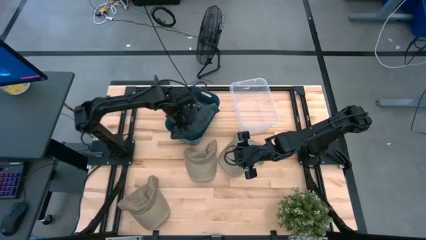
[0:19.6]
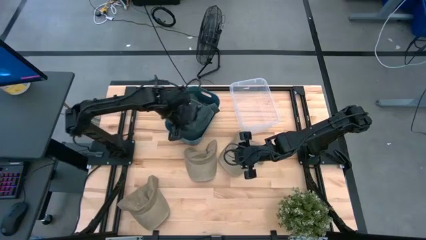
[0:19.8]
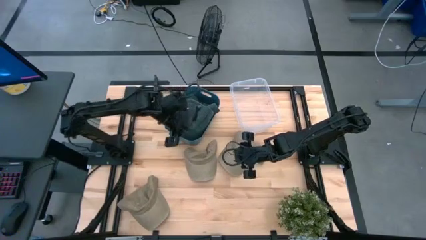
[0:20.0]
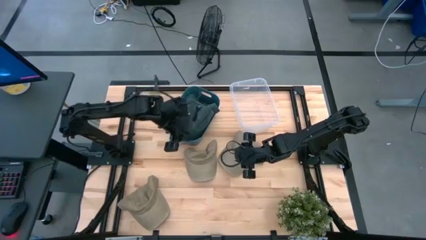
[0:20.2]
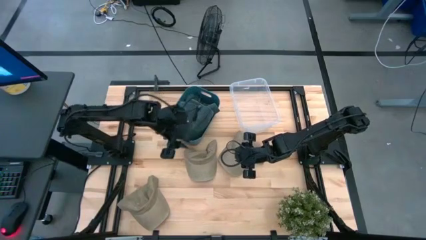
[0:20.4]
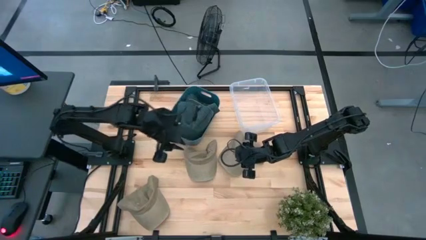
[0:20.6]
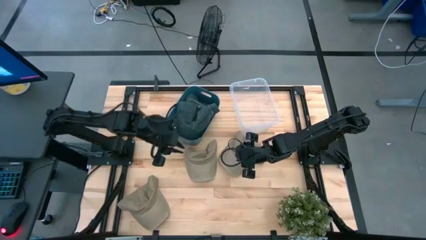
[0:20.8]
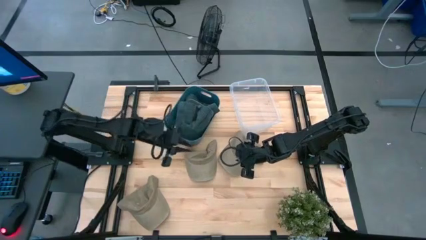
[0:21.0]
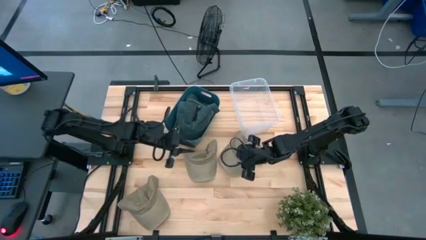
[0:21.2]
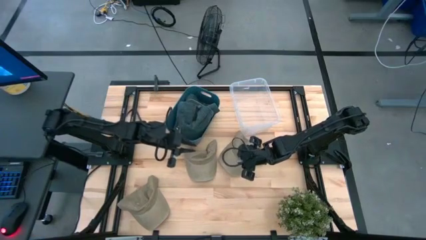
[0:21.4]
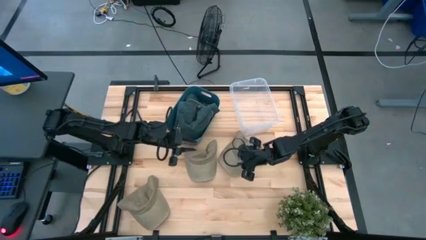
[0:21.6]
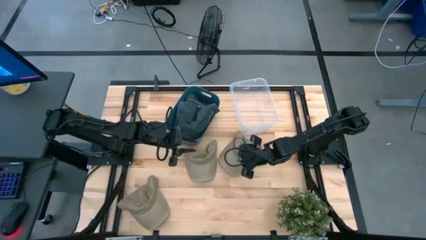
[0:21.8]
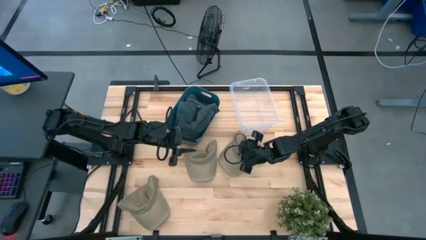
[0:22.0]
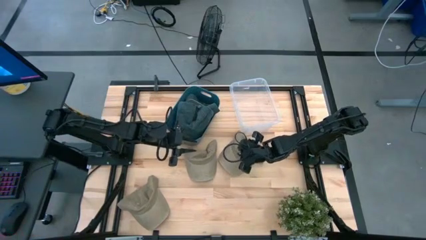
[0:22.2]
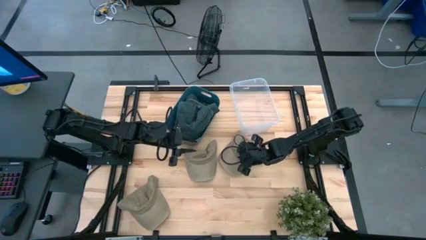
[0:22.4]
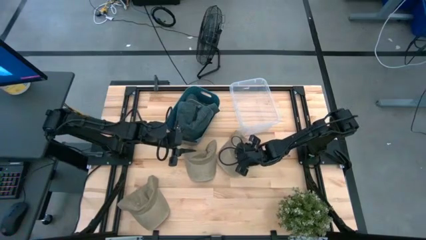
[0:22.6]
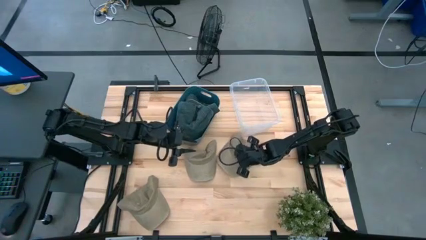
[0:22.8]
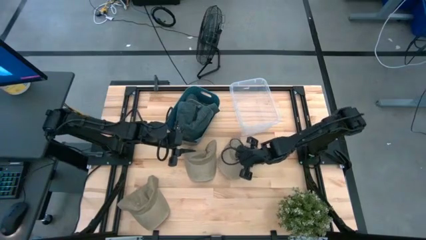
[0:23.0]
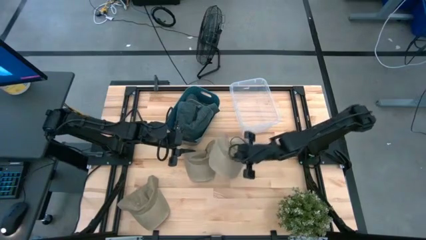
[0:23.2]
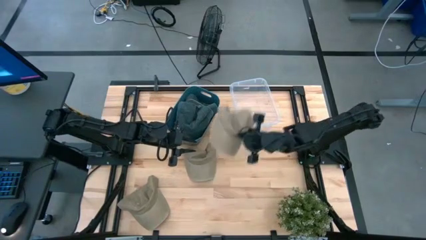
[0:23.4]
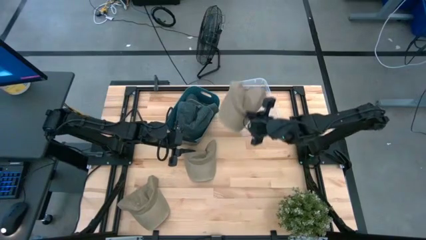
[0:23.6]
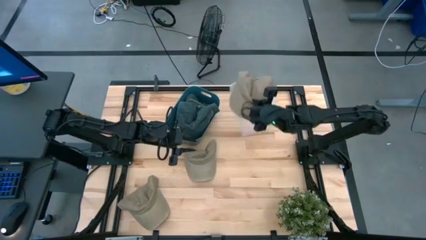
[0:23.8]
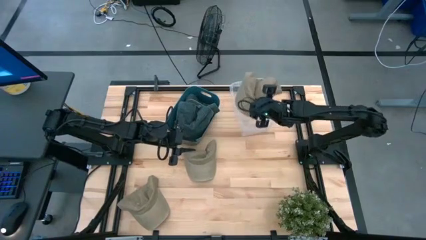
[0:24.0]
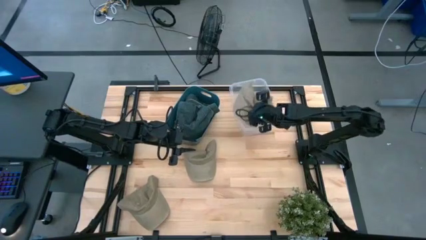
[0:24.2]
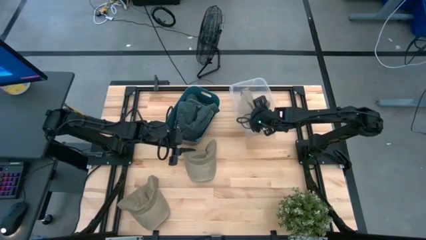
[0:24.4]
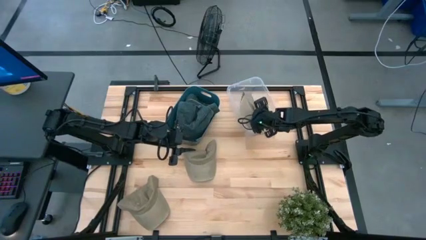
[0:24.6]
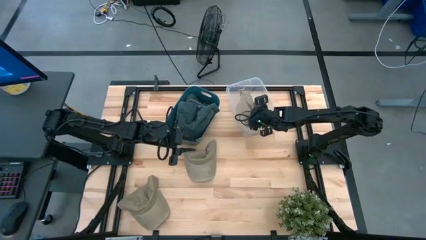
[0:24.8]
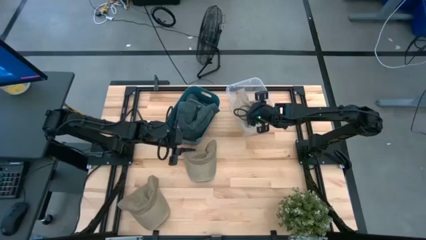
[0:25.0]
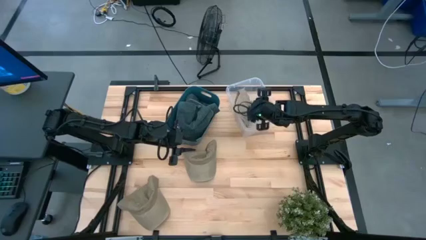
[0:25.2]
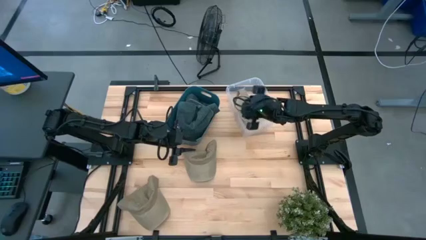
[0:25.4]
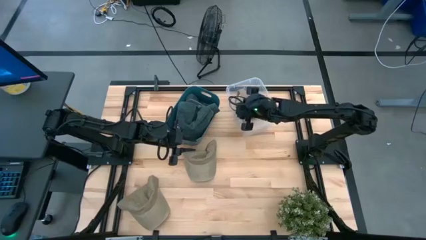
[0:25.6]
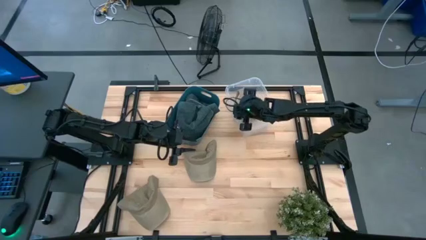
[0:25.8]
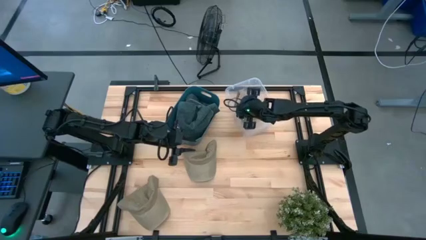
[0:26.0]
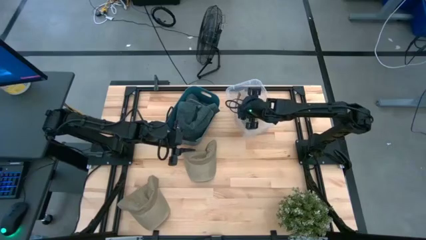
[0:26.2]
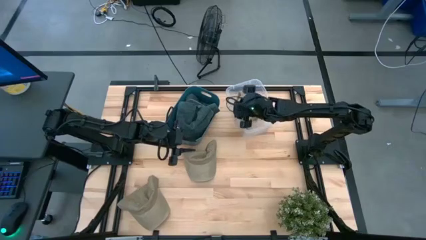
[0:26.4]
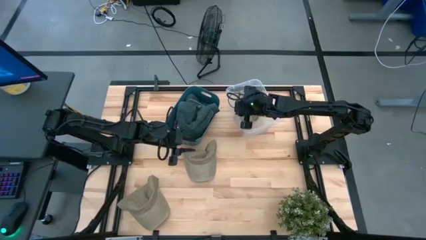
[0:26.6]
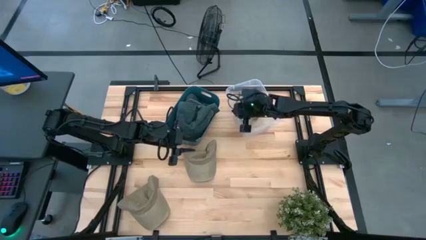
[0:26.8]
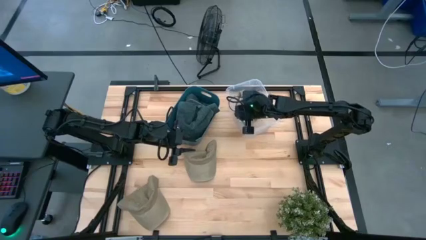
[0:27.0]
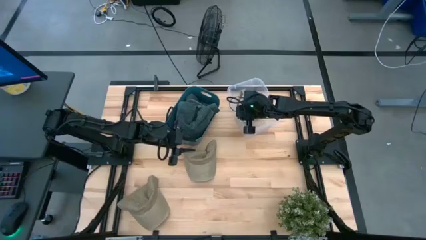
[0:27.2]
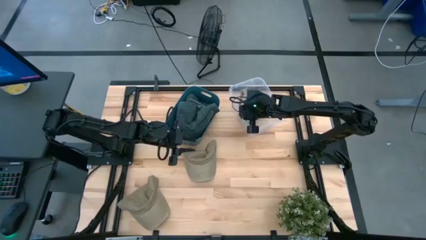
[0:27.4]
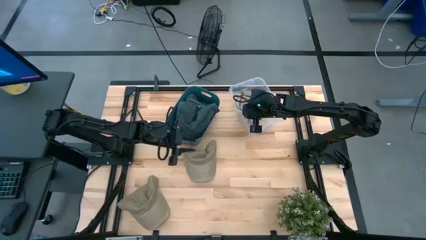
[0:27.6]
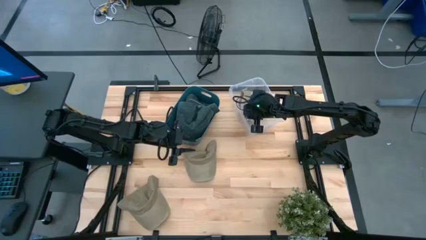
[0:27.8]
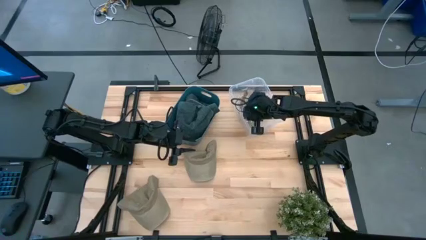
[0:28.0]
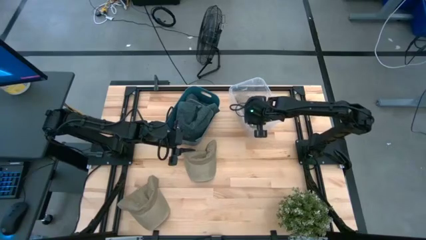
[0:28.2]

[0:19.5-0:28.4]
Task: Pick & Place hat
Put the right brown cap into the transparent bin

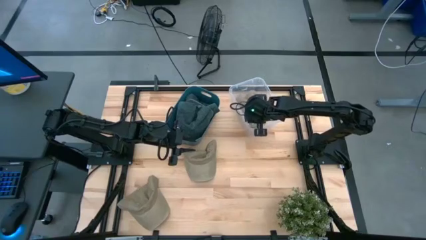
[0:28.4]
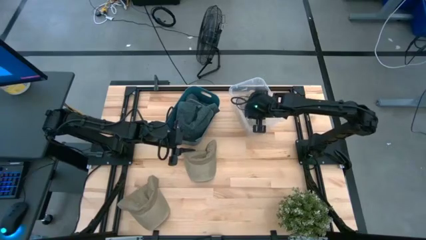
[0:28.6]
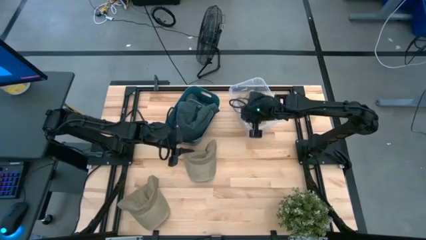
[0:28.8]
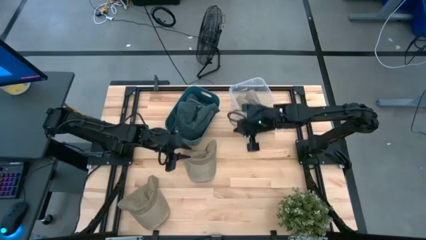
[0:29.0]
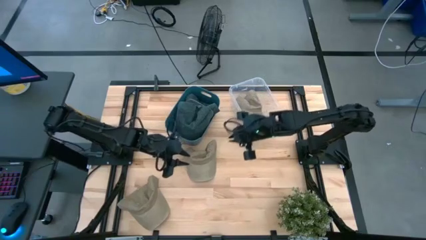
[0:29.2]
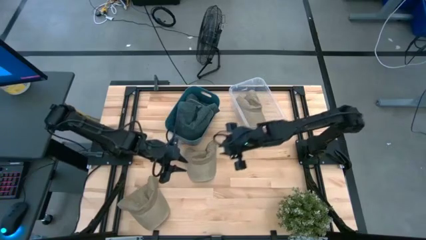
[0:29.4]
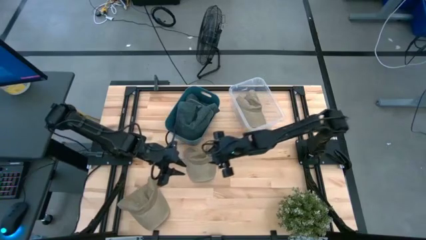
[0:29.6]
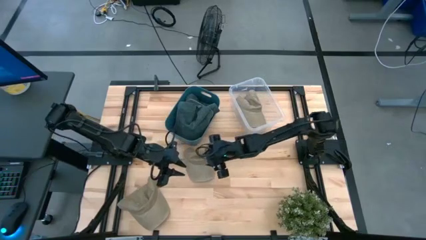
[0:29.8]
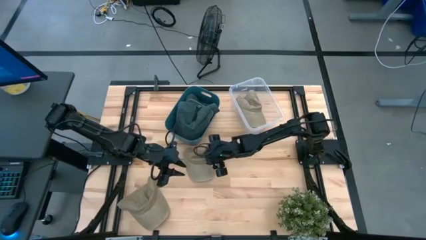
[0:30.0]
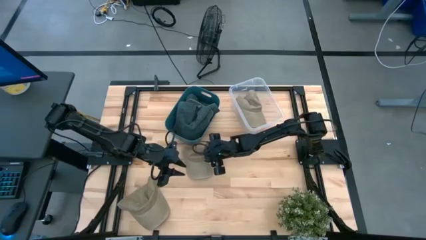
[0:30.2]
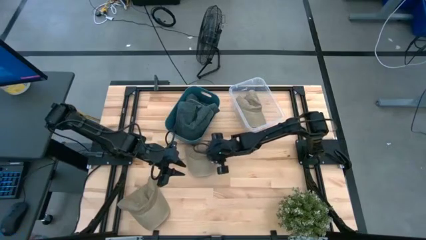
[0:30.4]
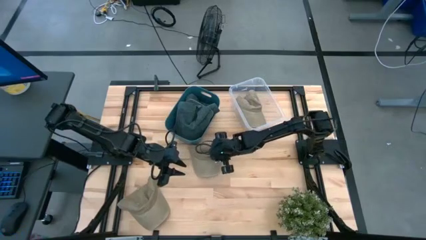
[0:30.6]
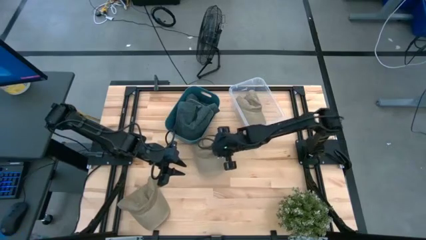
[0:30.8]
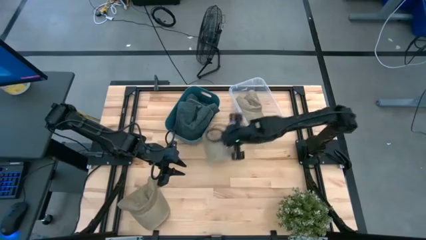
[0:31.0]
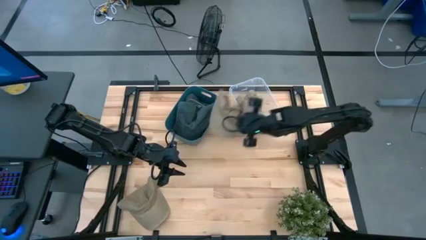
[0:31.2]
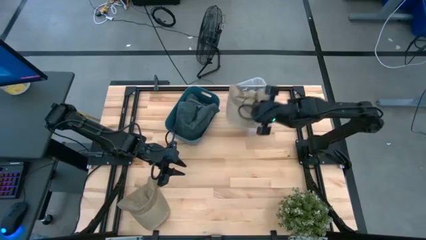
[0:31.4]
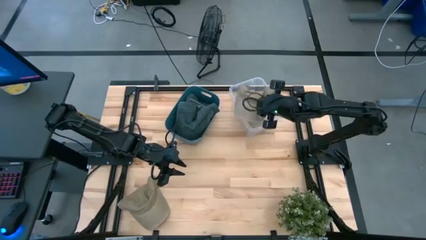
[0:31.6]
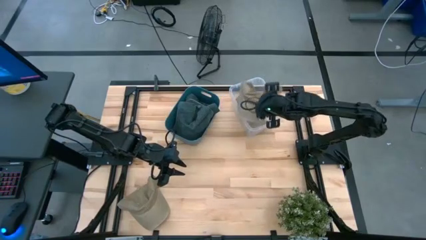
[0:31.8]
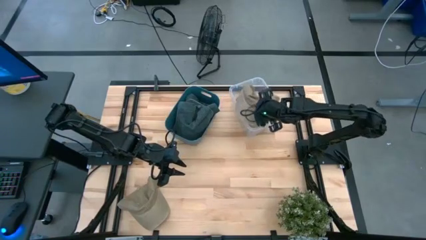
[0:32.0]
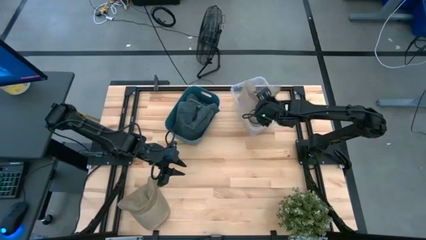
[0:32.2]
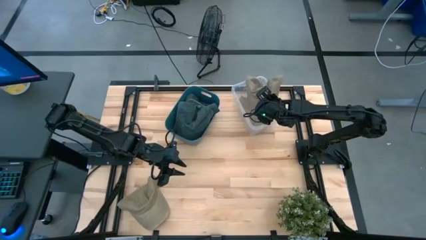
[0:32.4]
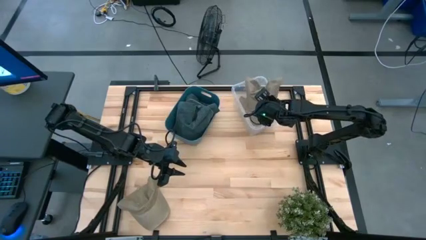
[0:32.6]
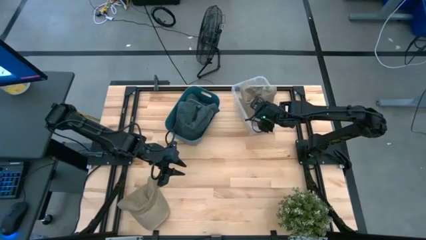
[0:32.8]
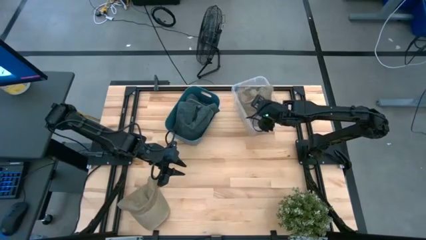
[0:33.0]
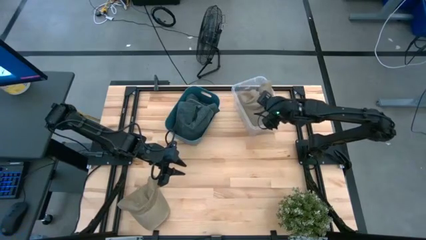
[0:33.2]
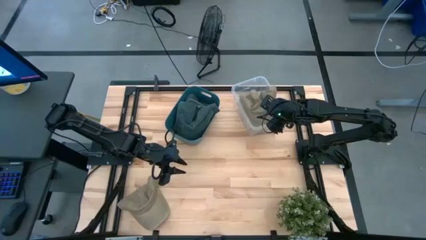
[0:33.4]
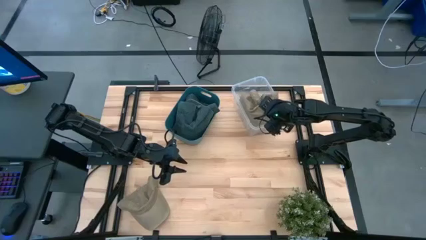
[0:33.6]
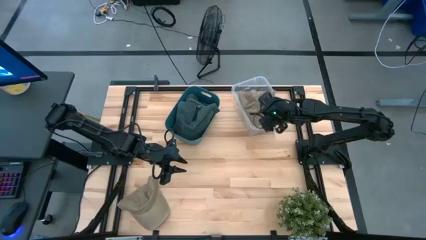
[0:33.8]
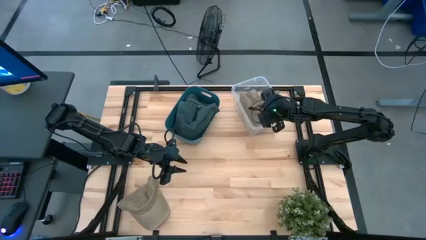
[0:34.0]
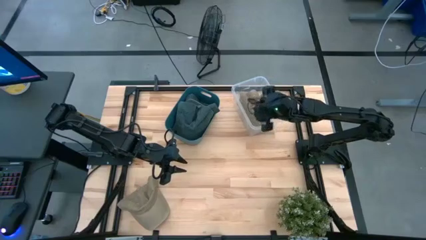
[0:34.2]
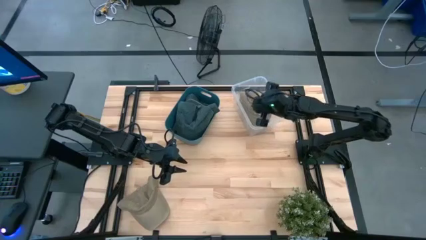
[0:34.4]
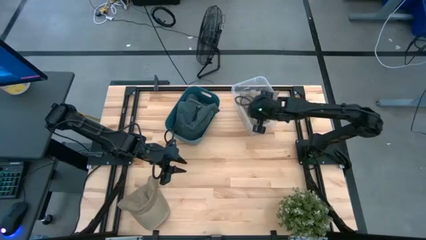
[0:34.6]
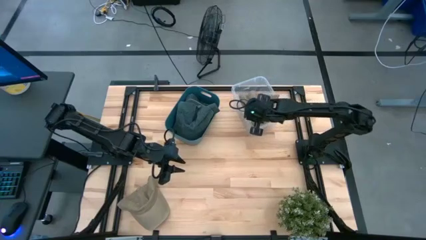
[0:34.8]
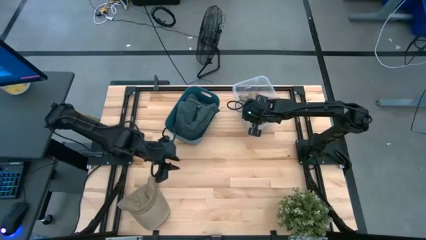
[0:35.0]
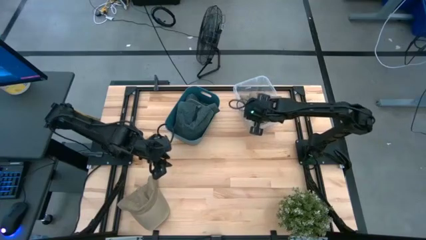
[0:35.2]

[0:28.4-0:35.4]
Put the right brown cap into the transparent bin
